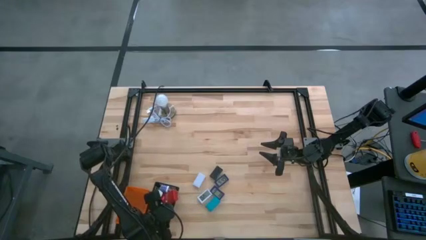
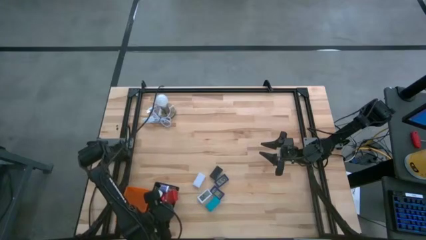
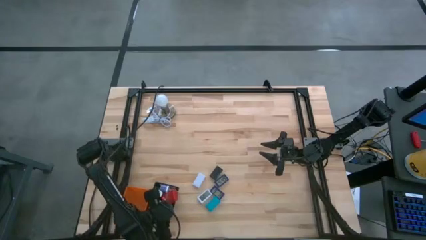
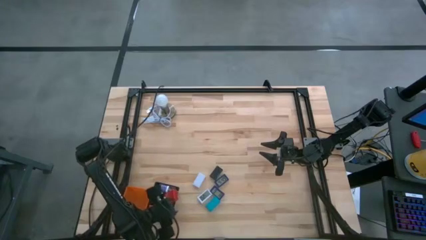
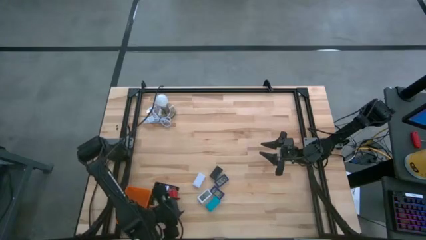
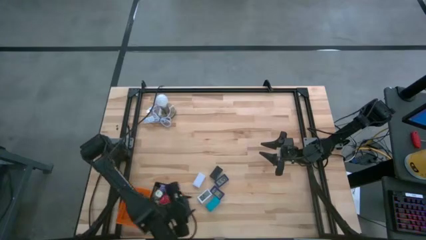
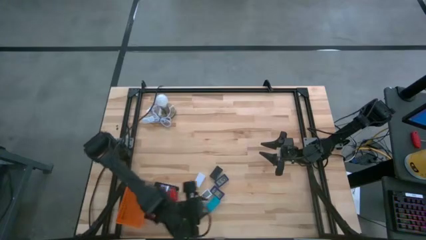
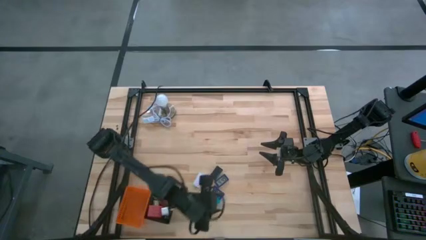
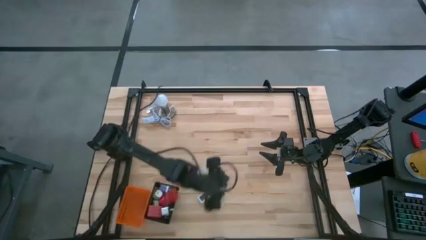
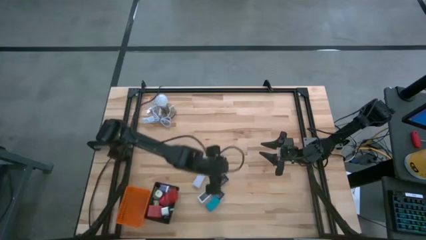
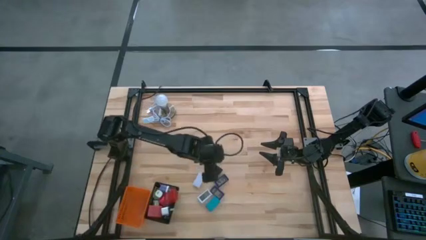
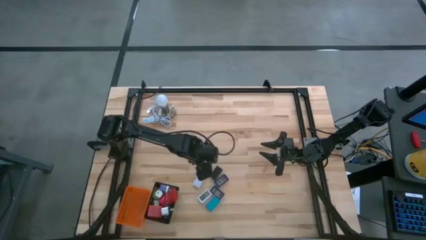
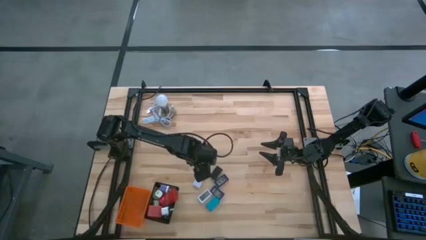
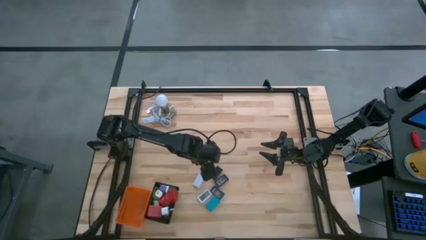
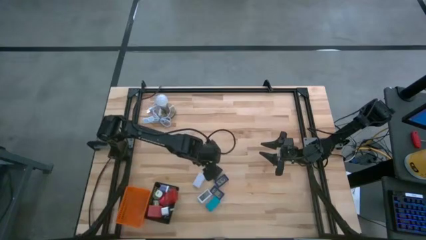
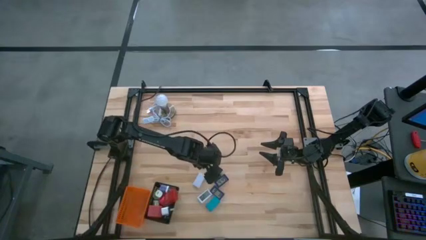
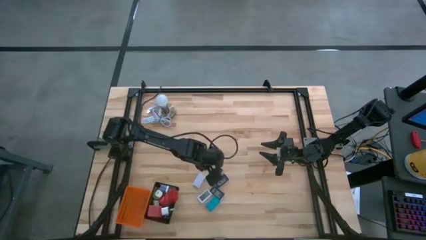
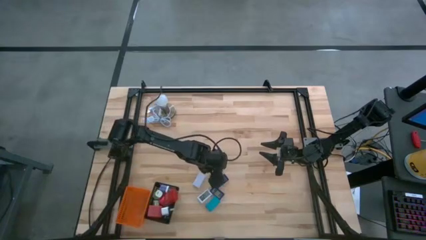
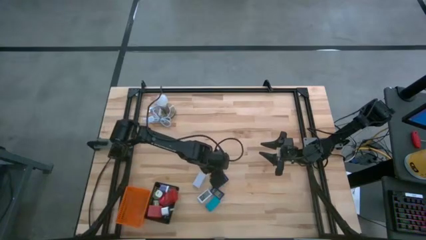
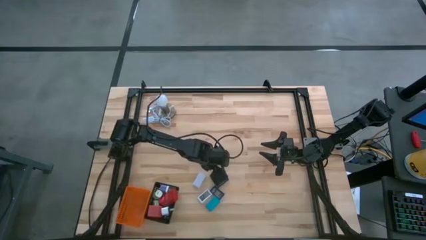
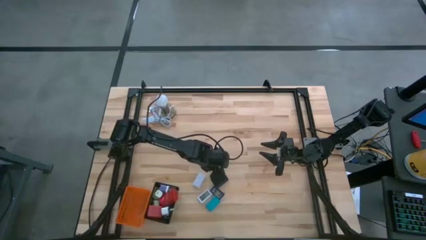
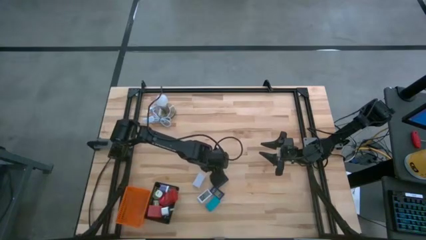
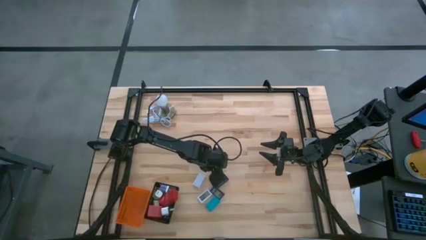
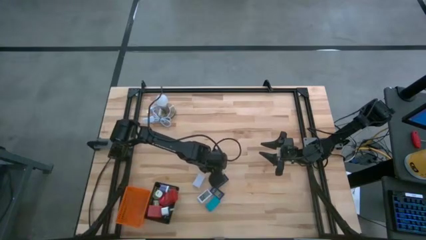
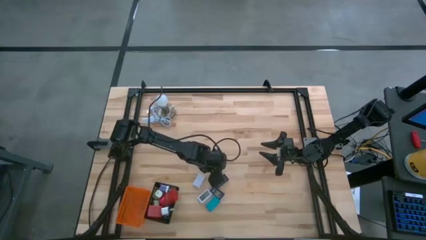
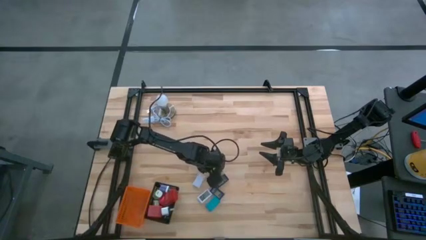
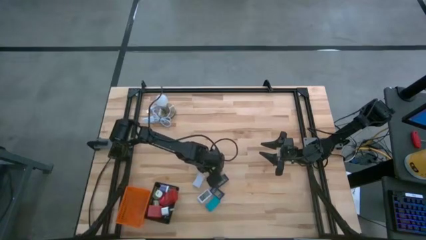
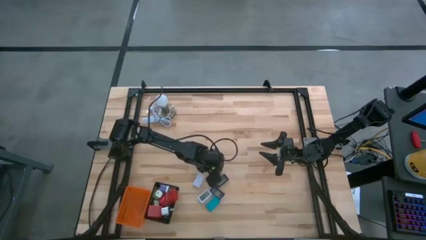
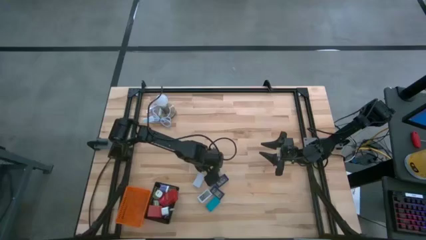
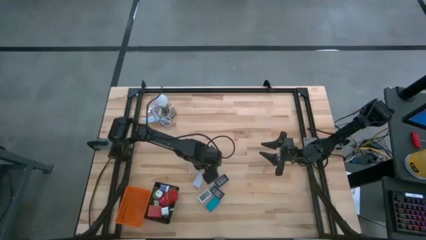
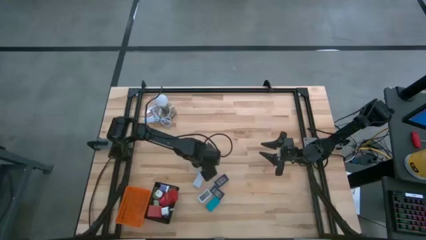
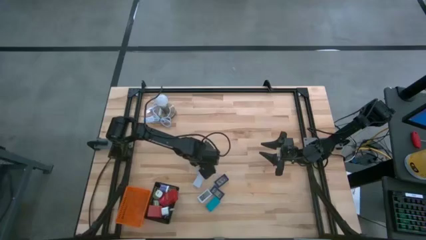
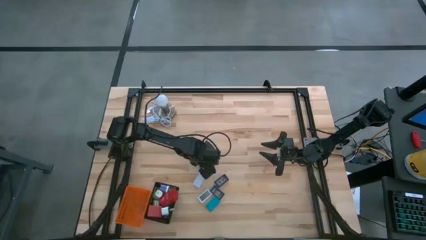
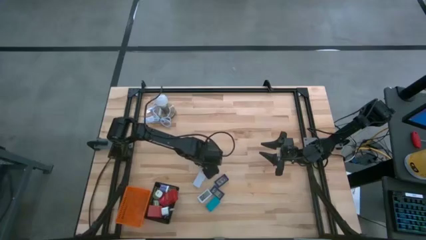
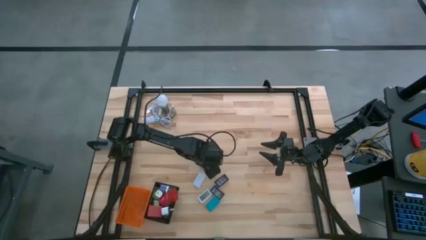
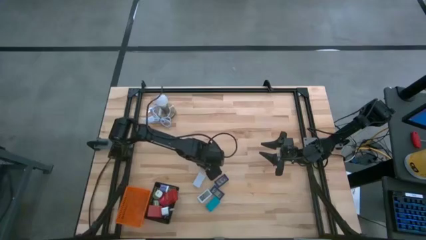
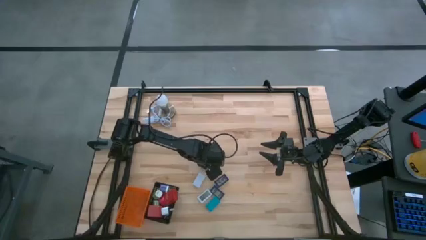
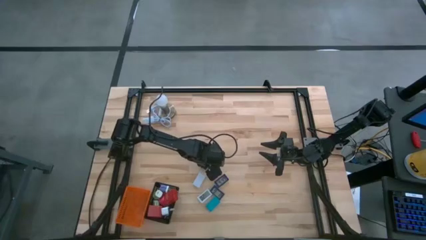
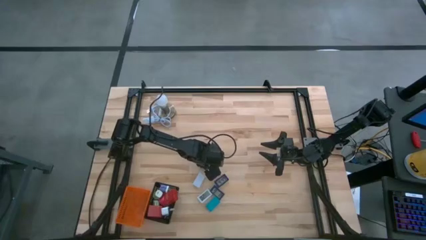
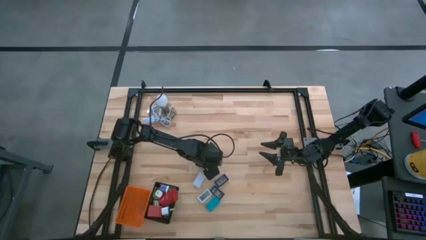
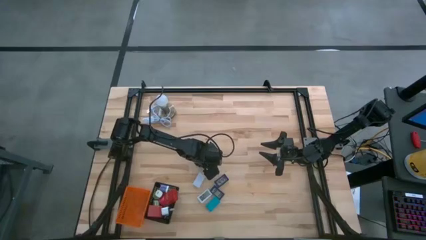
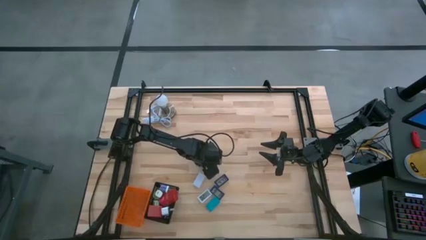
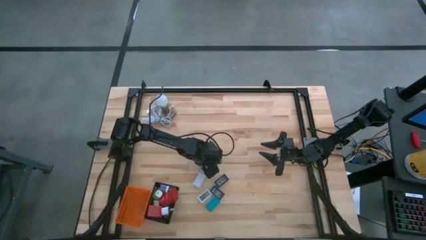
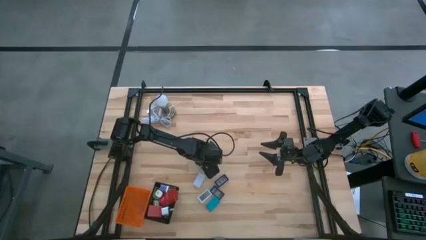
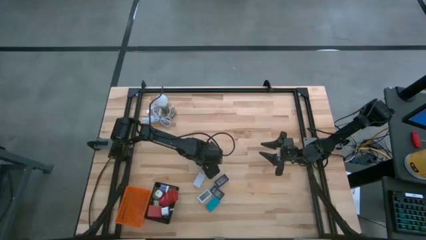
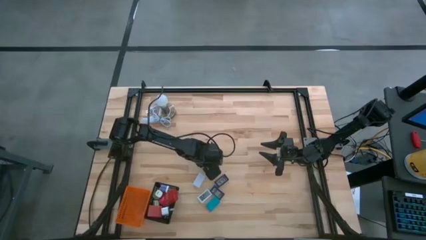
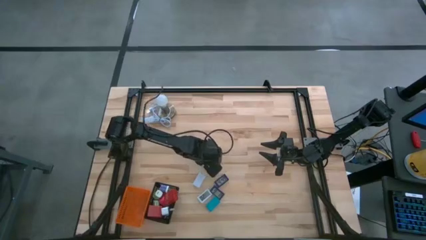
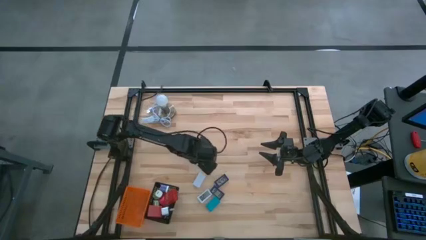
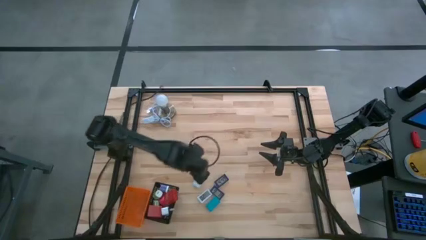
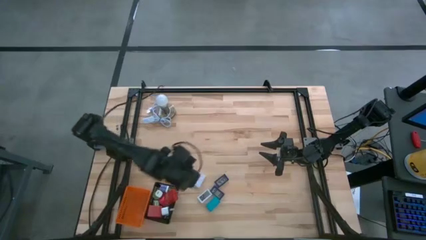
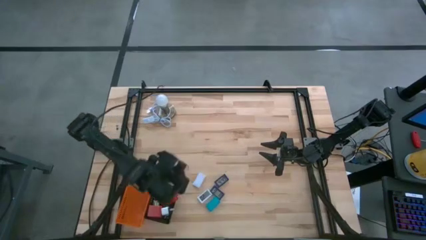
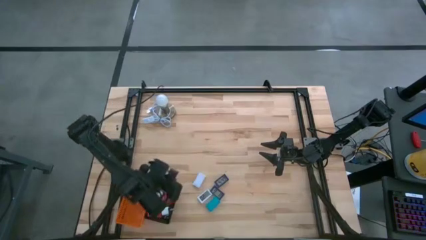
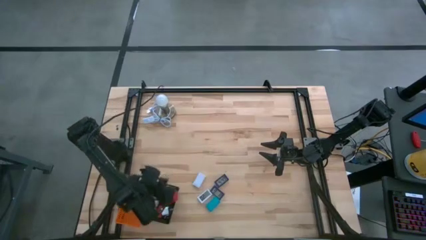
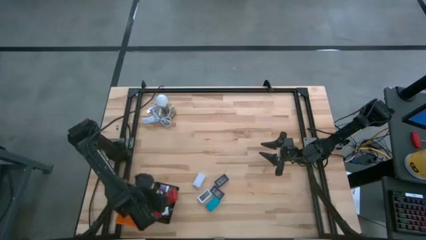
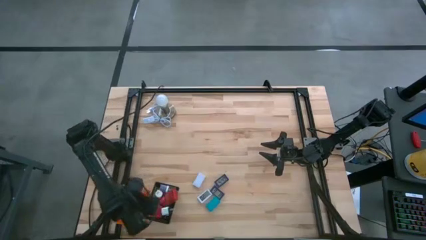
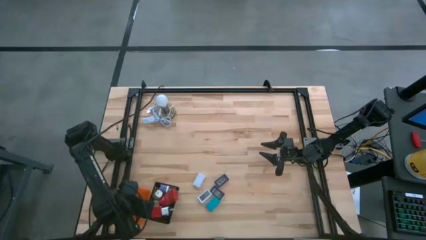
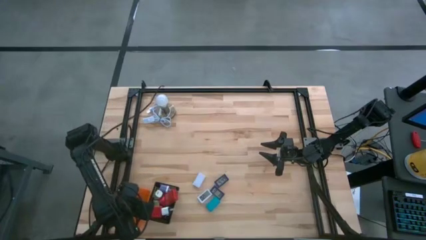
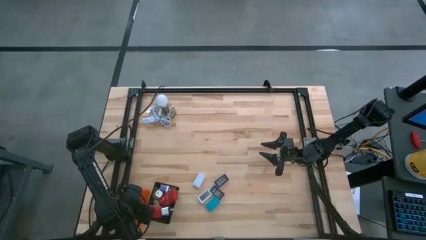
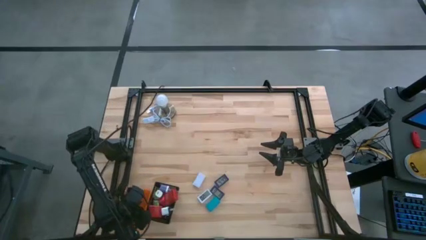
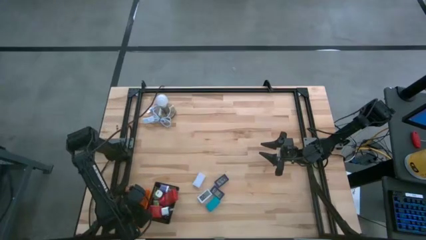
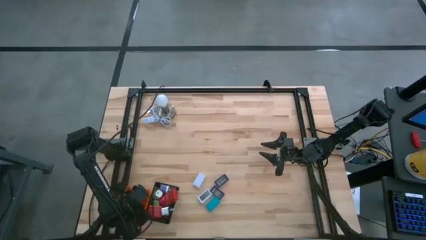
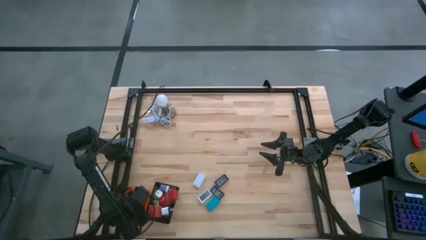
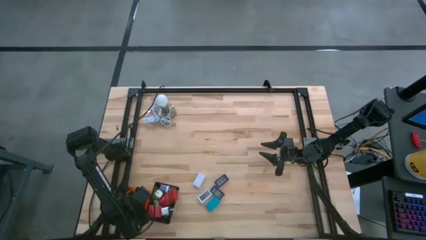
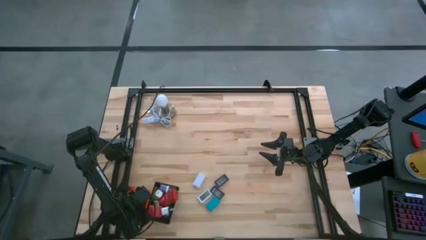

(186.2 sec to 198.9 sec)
Task: Pick & Place Office items
Put the black digital clock into the orange basket
